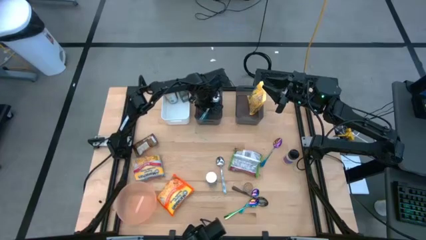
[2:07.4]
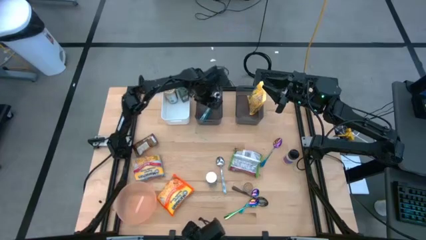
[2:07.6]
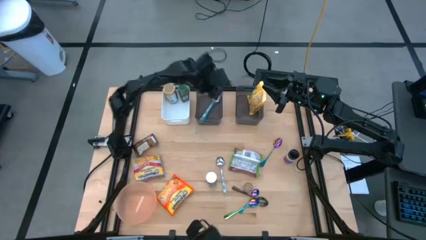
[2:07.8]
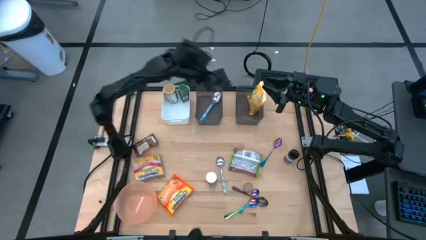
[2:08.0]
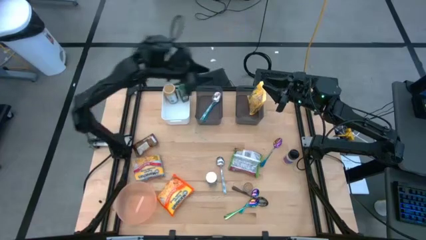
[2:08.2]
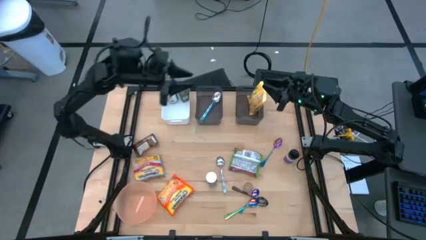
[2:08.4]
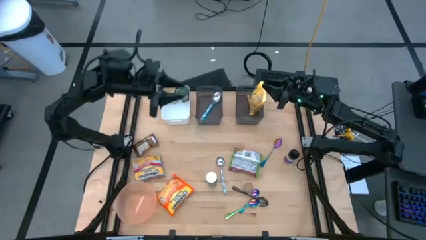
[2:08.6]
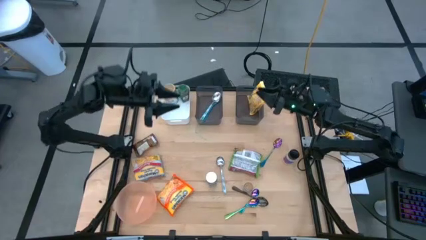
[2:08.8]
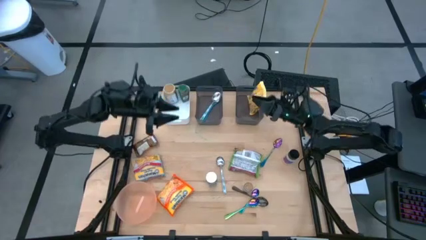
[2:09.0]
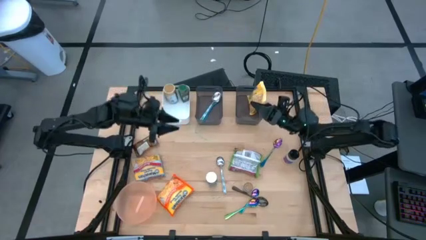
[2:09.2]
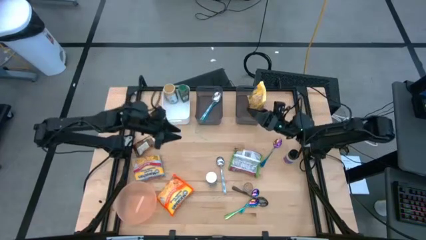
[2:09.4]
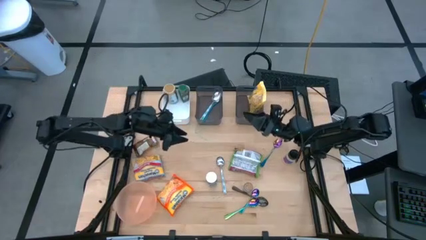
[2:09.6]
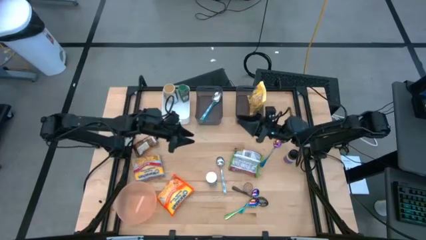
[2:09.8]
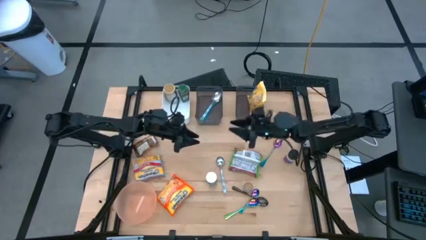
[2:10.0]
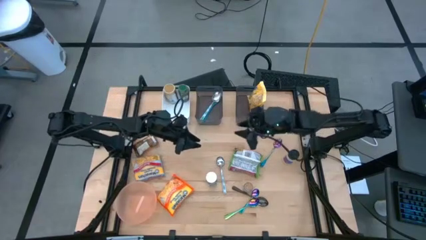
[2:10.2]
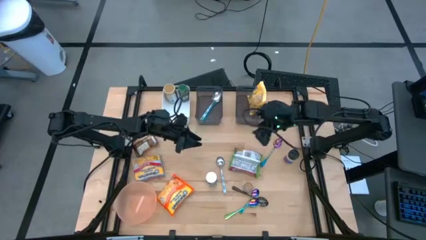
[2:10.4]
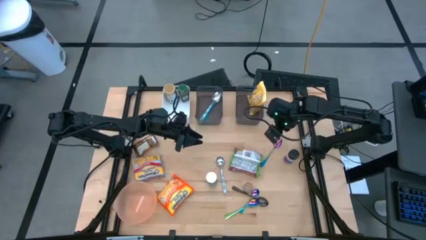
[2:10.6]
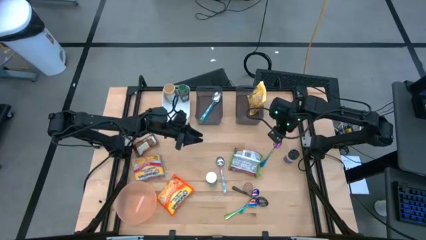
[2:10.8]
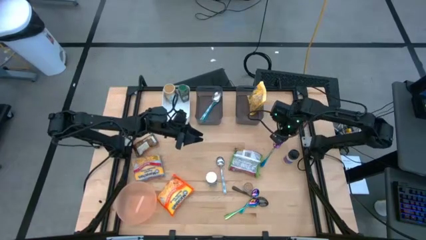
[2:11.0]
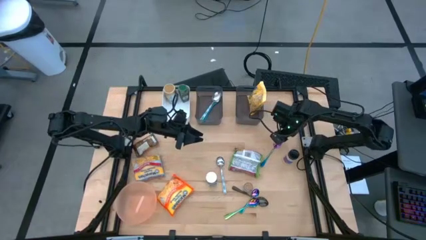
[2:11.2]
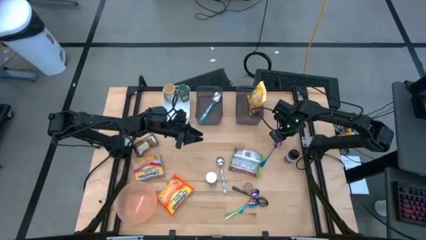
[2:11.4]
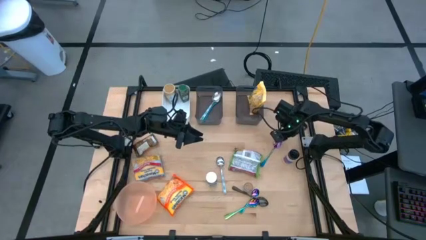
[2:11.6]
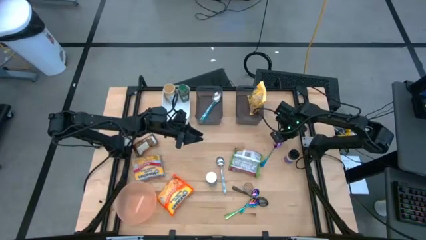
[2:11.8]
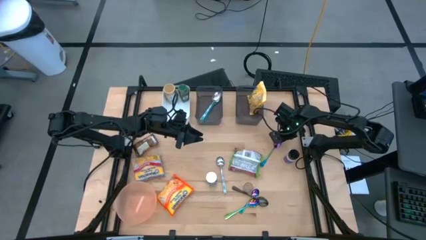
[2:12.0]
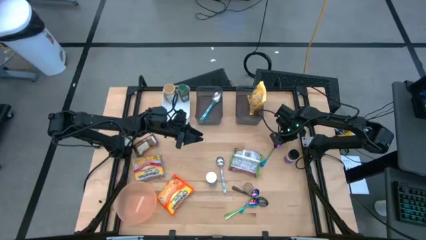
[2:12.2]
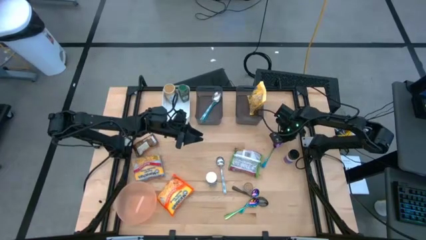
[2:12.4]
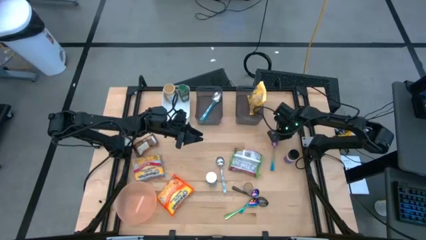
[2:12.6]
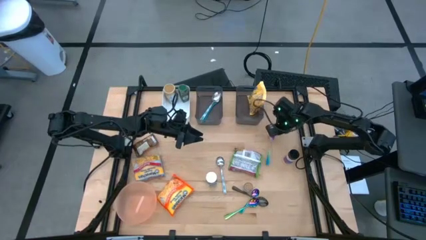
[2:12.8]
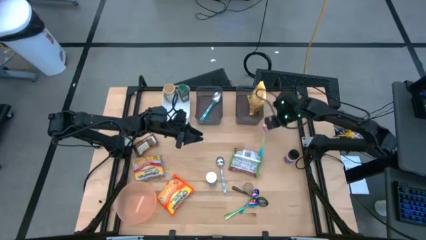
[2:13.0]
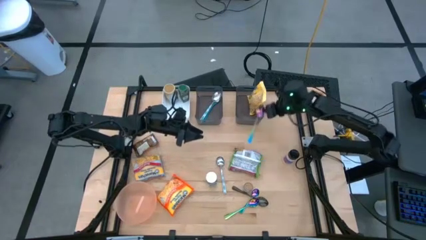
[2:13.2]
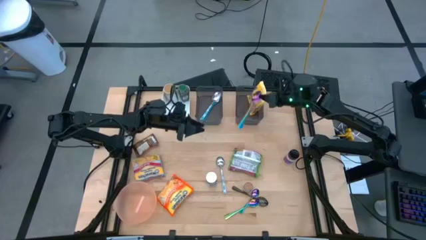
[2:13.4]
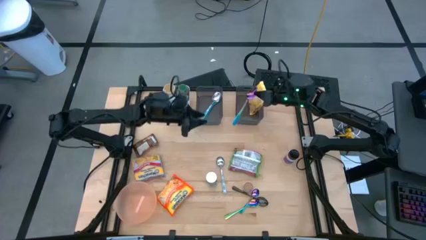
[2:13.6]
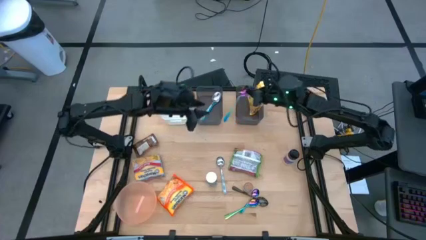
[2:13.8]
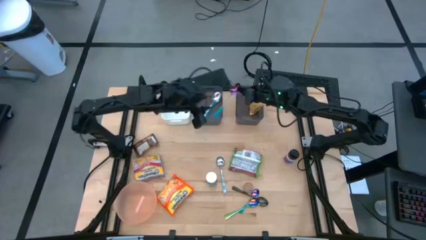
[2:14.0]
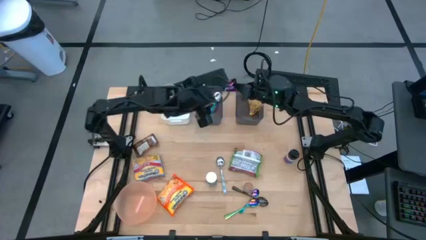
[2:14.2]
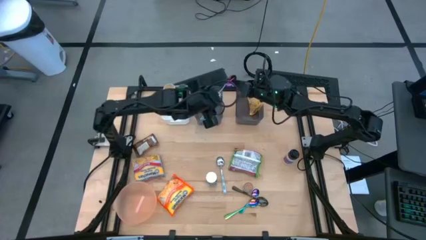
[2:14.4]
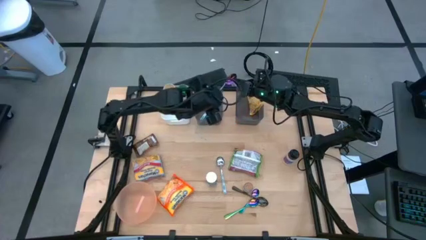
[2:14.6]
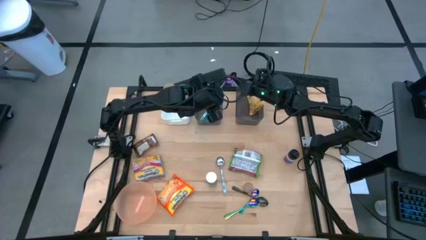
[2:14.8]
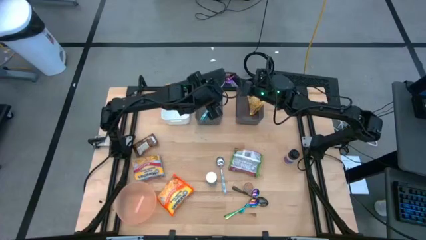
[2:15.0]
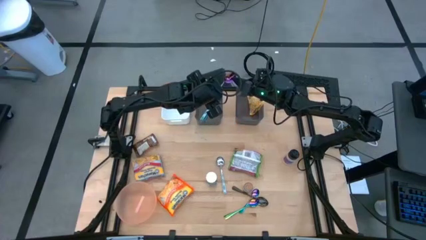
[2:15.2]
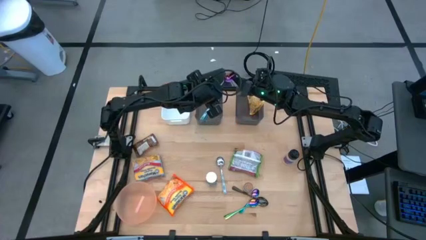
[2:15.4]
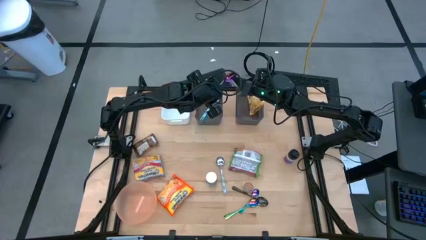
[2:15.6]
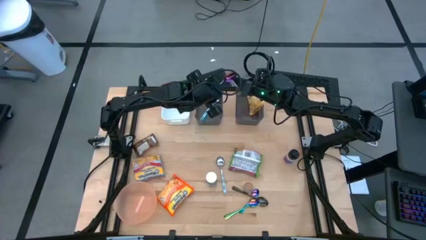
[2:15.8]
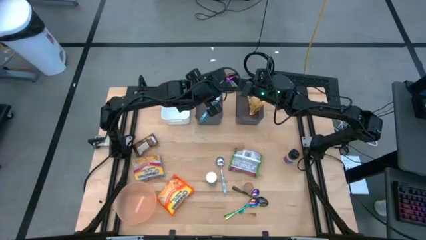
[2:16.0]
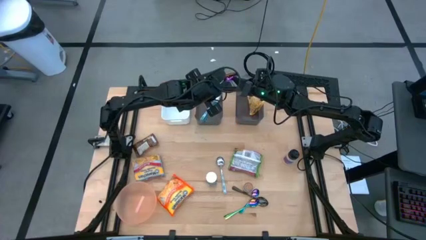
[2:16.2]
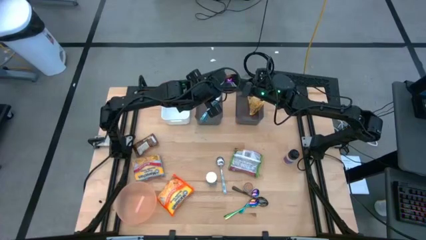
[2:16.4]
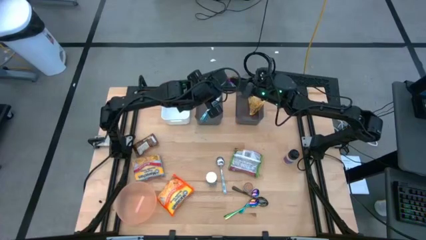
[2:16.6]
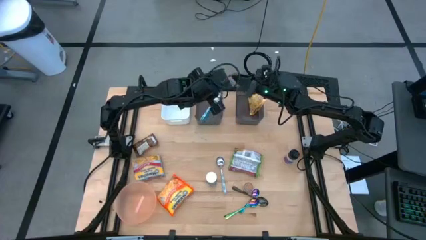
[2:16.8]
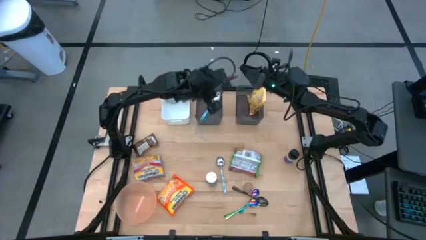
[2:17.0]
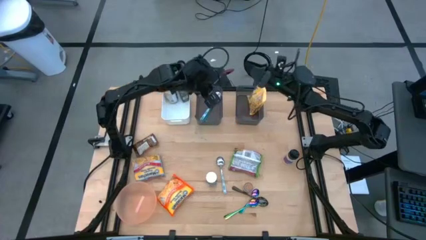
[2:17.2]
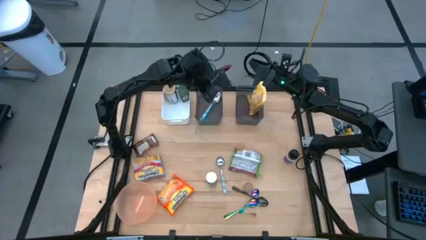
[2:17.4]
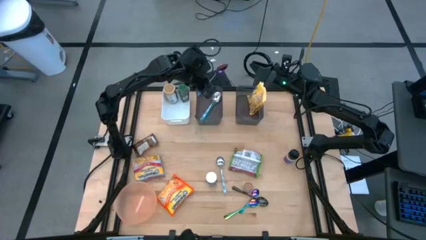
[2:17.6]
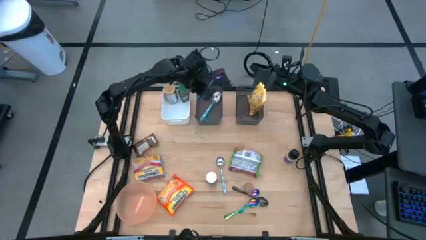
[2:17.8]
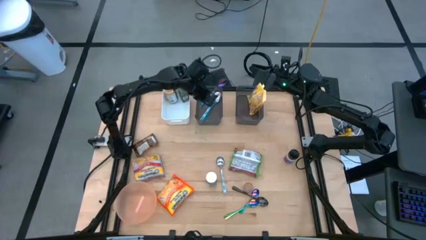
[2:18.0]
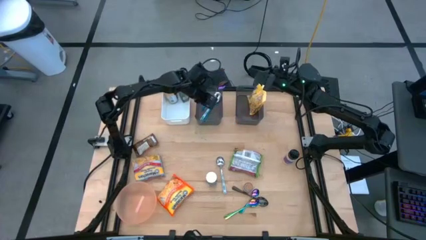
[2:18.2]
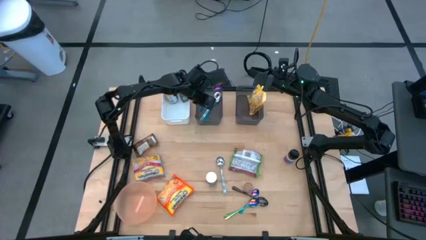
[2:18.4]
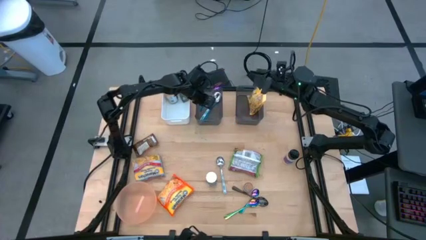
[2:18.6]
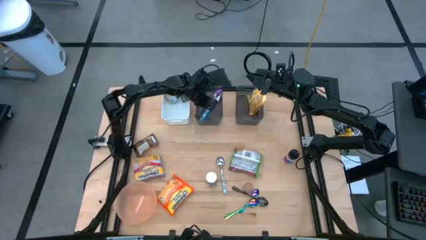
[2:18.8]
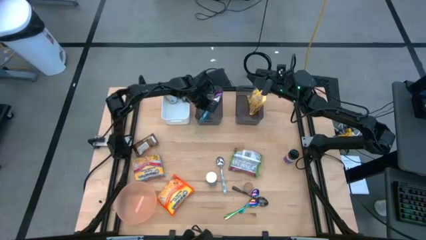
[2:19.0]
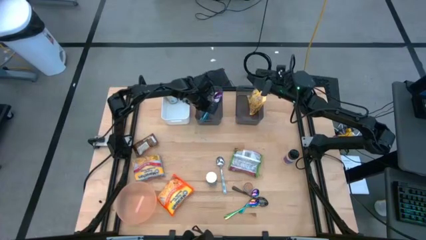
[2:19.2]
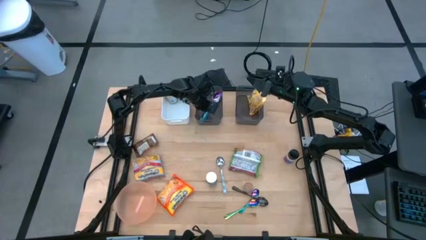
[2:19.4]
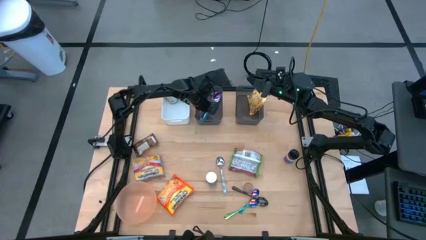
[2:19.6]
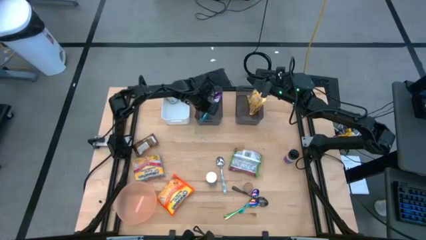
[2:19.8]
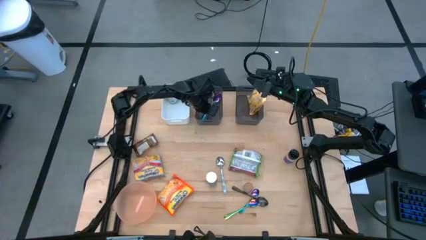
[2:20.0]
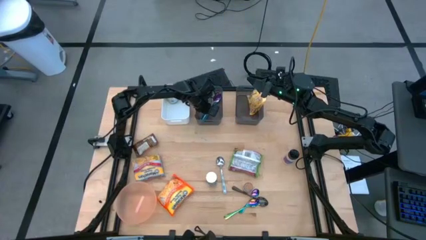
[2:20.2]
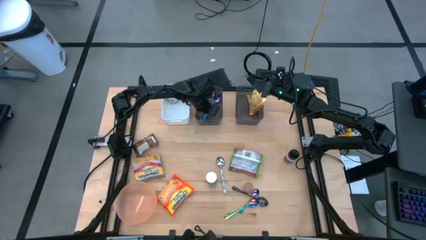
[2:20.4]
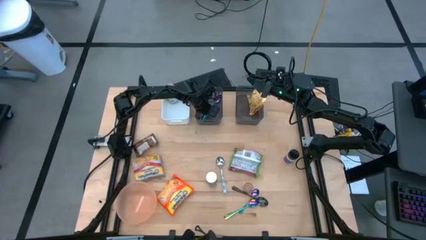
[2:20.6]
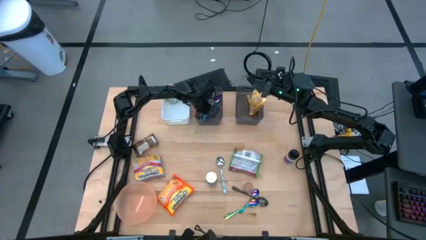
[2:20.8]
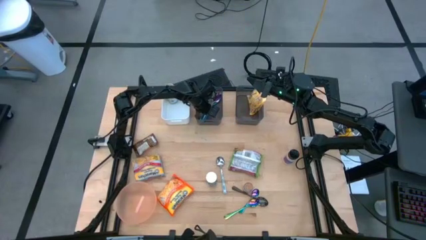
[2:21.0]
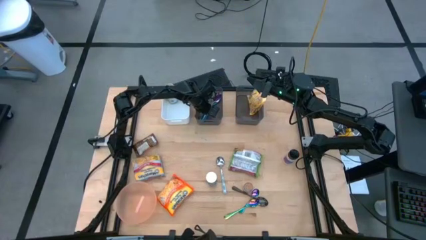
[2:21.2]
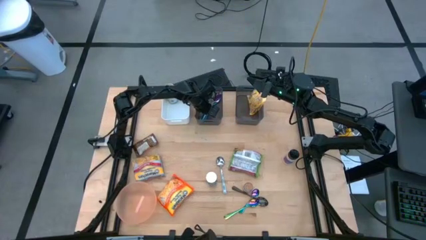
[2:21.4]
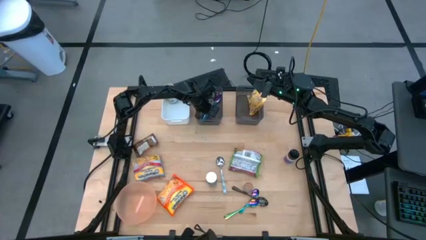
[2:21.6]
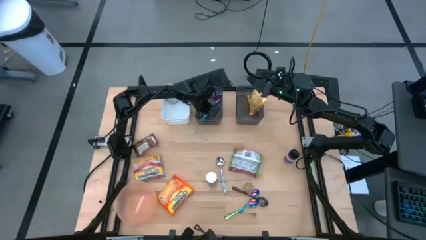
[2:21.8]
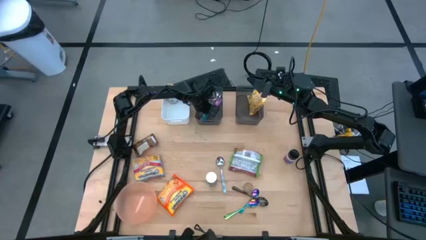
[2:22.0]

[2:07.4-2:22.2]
Task: Pick & Place Food Item
Put the top violet spoon into the left black bin
